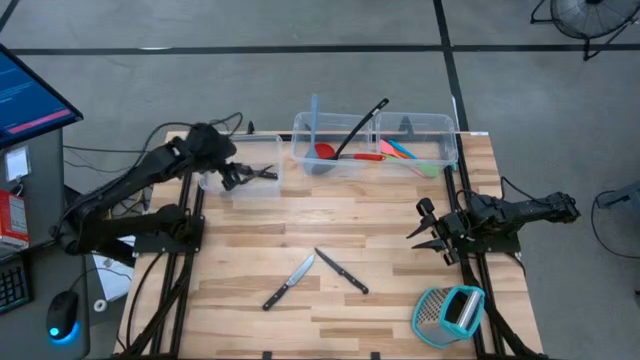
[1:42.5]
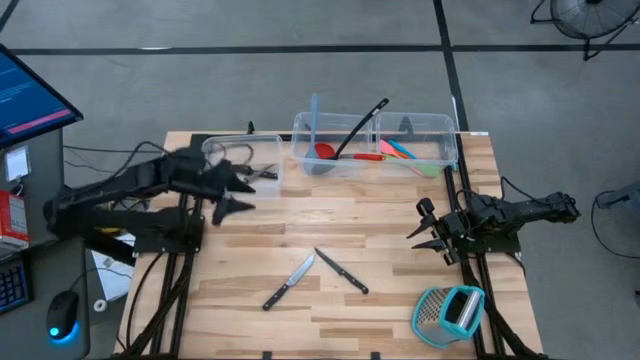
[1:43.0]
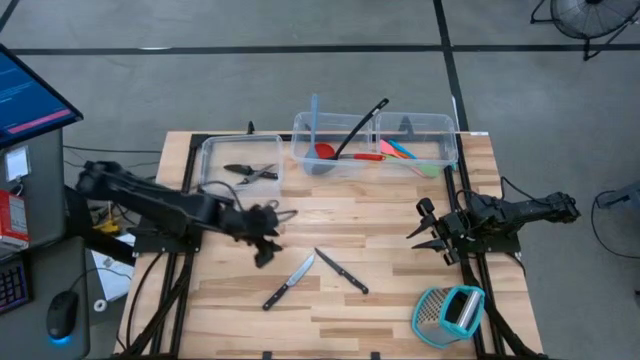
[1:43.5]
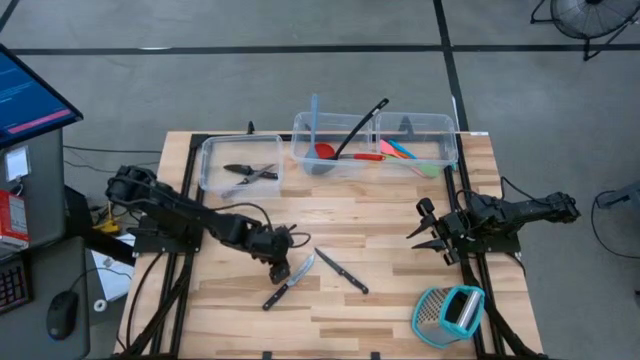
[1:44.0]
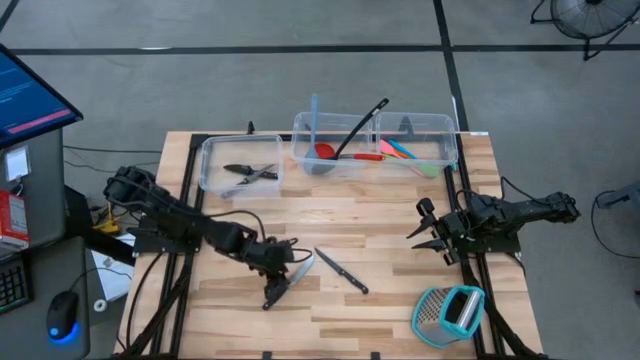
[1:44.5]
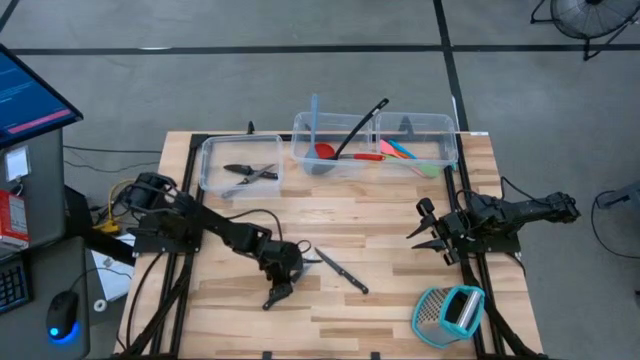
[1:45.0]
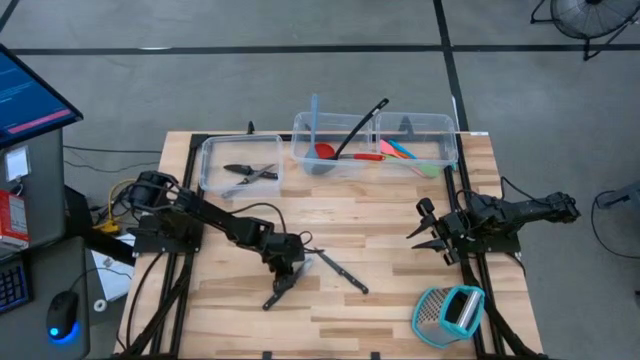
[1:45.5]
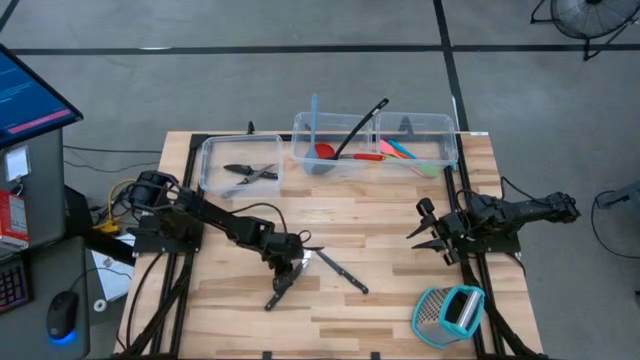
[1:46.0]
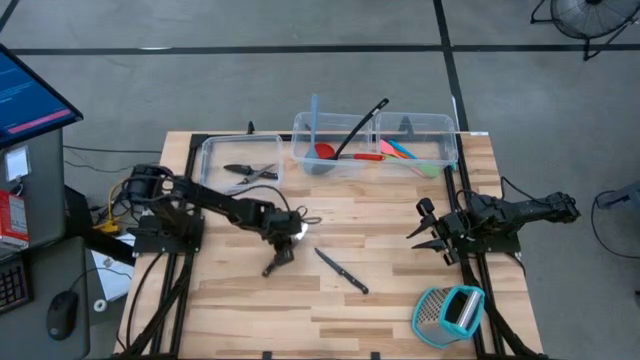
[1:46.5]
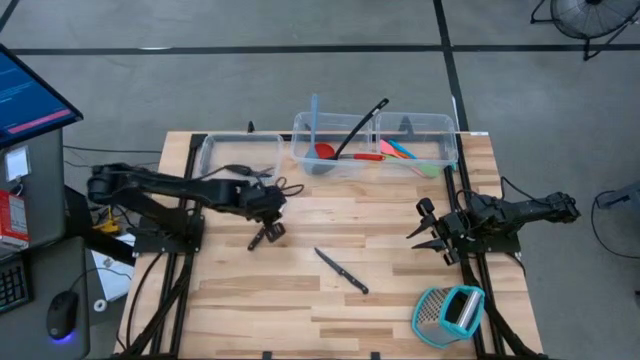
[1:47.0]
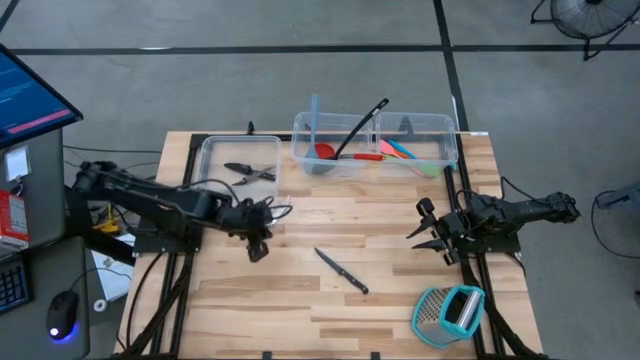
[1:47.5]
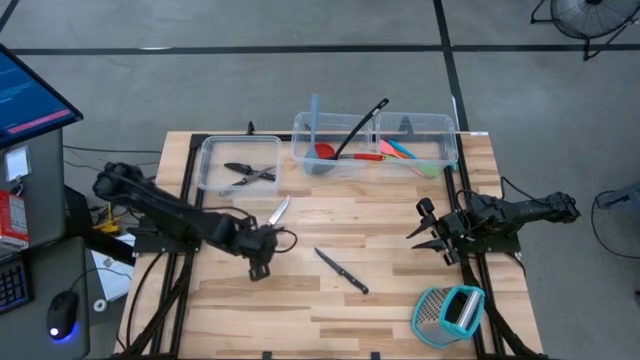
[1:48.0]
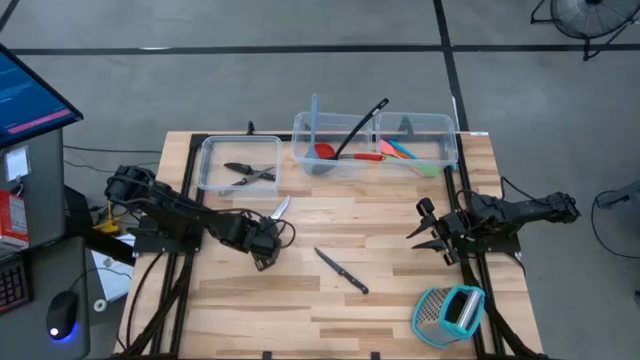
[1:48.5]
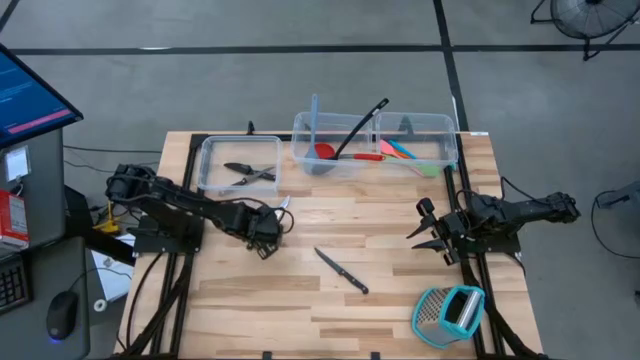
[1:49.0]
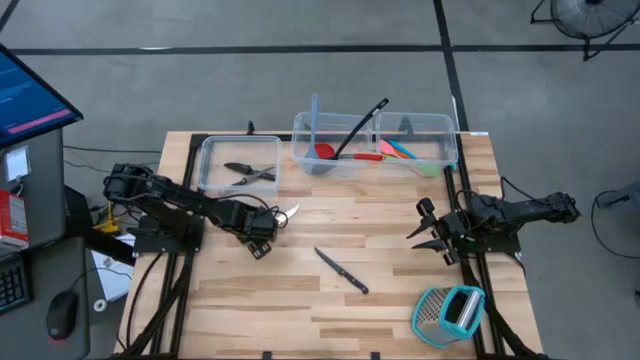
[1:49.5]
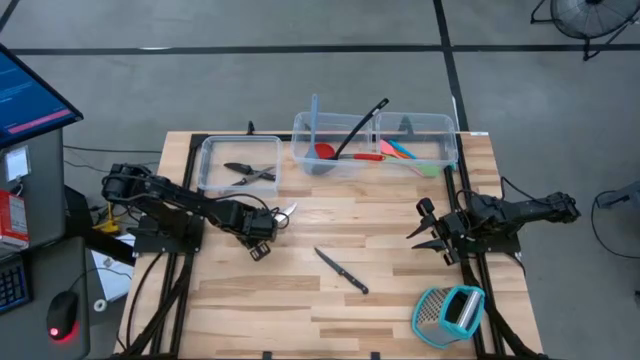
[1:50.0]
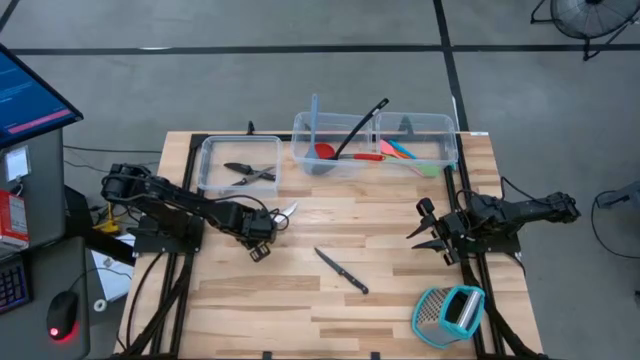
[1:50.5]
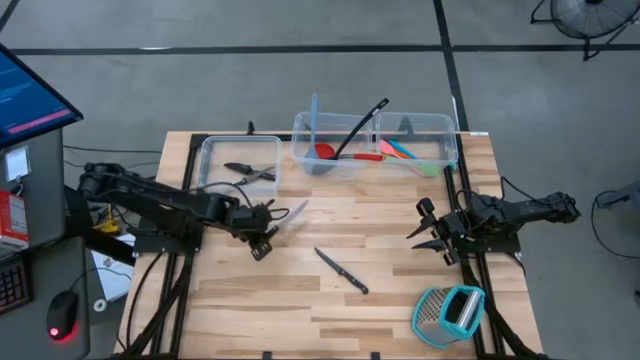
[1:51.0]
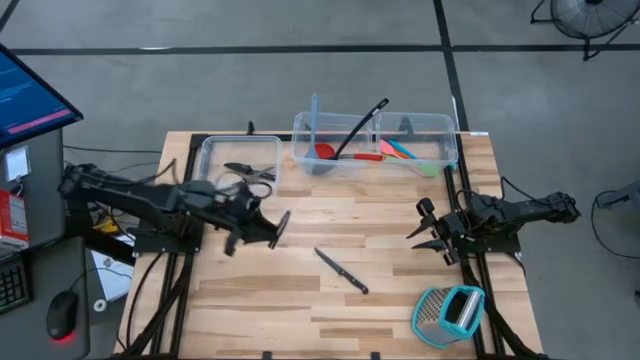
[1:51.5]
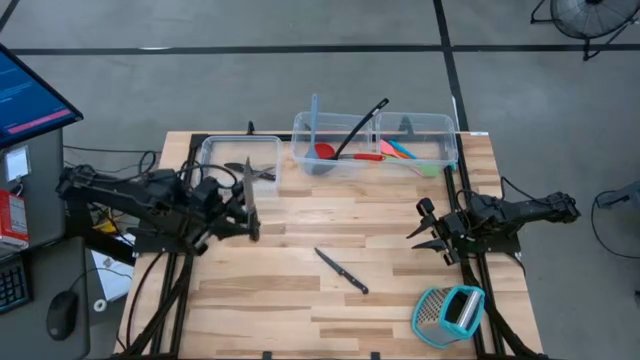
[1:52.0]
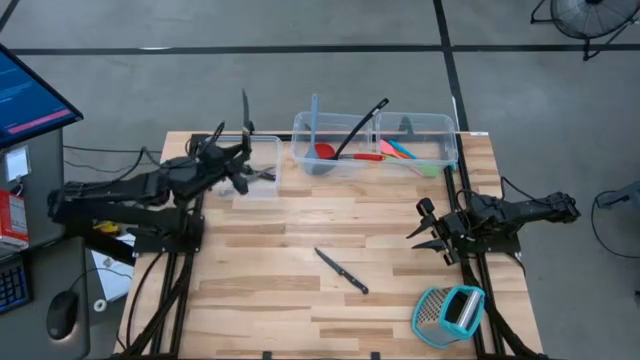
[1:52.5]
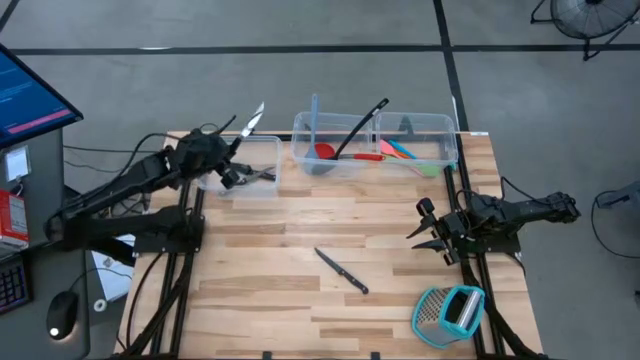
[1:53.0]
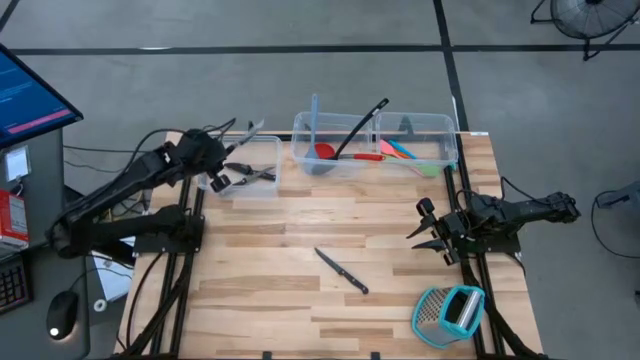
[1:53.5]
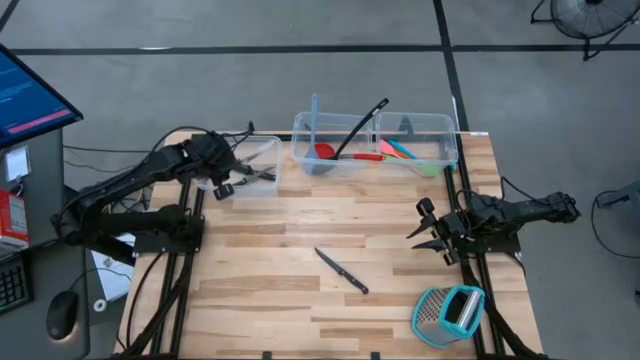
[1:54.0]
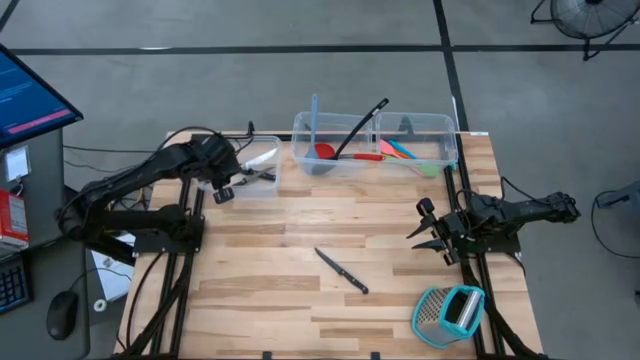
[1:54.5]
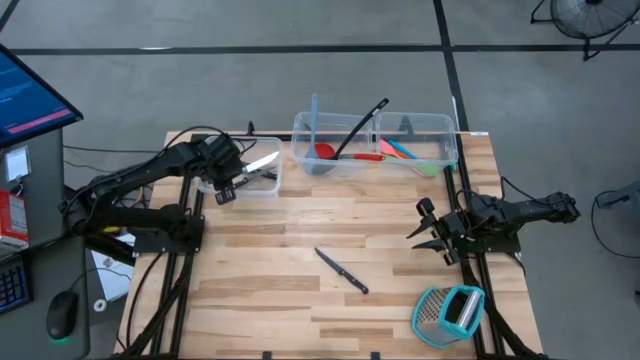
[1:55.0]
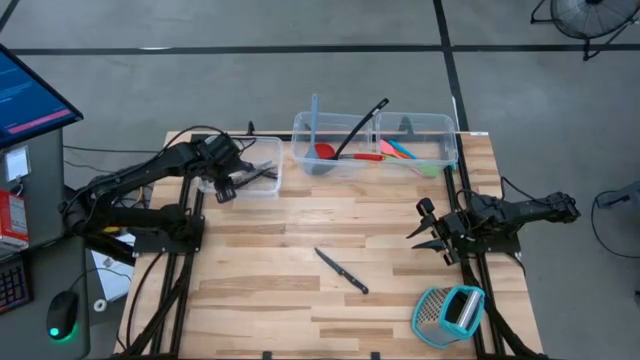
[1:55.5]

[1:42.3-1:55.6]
Task: Pick & Place Kitchen Items
Put the black knife into the top left transparent bin

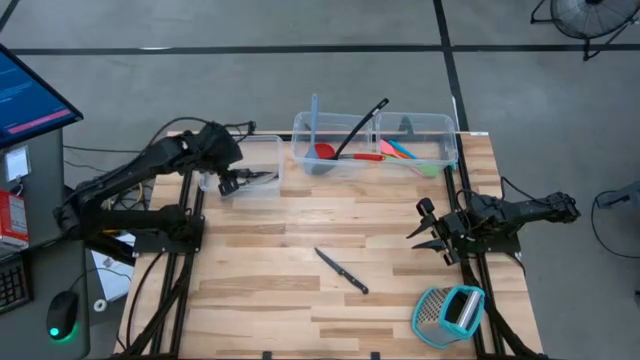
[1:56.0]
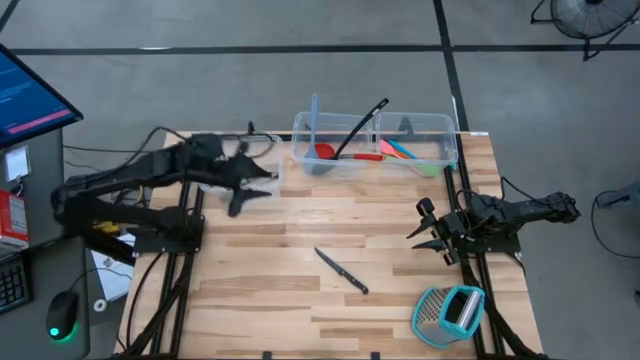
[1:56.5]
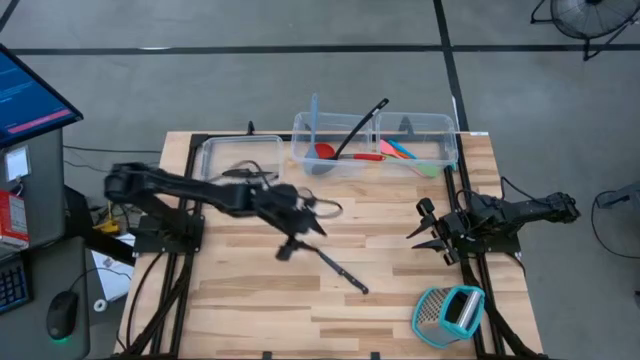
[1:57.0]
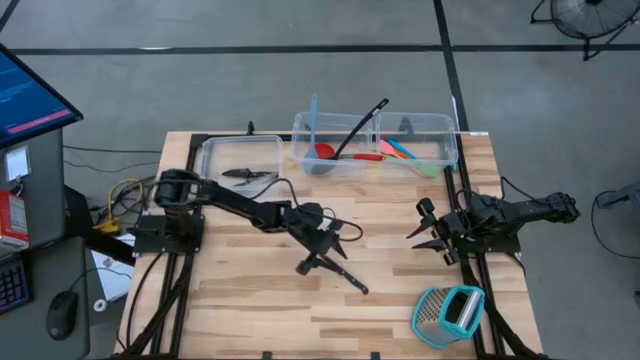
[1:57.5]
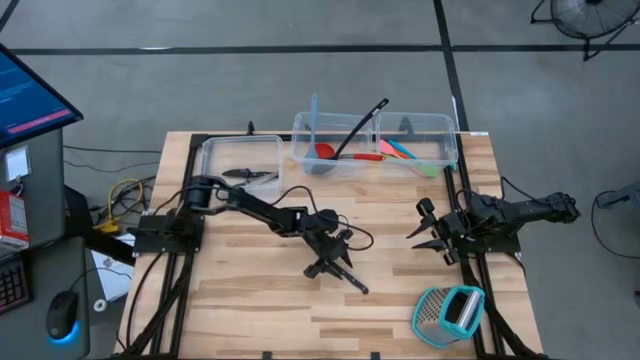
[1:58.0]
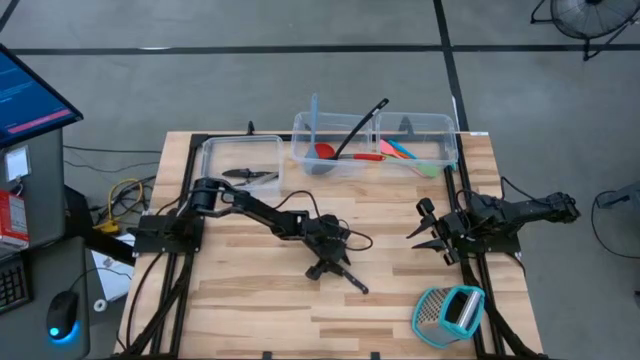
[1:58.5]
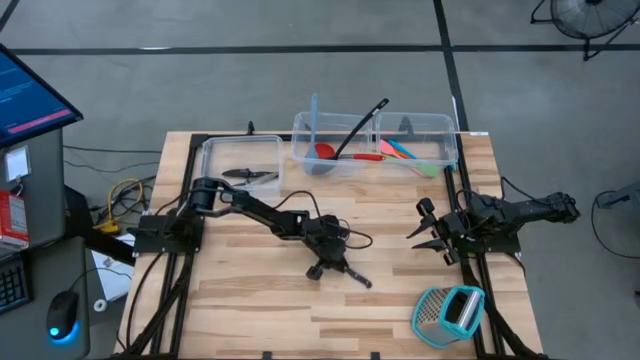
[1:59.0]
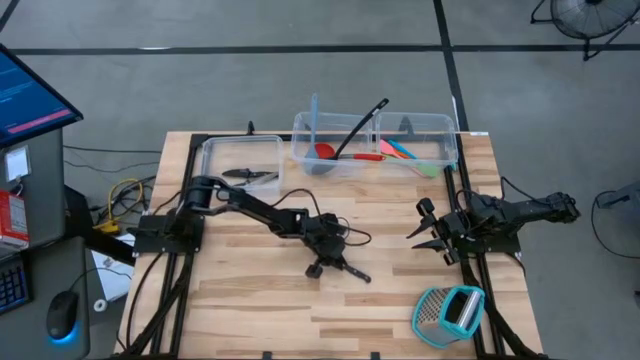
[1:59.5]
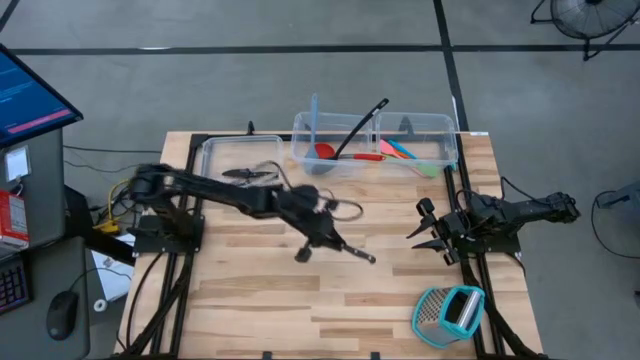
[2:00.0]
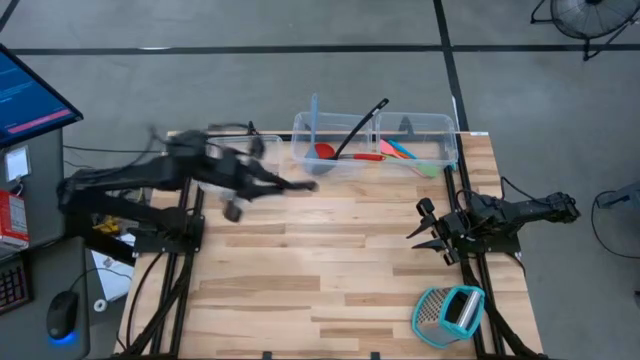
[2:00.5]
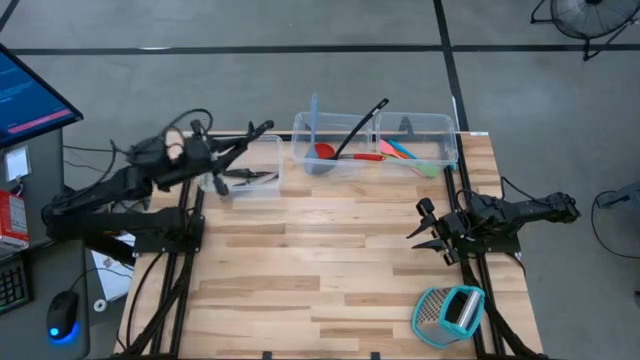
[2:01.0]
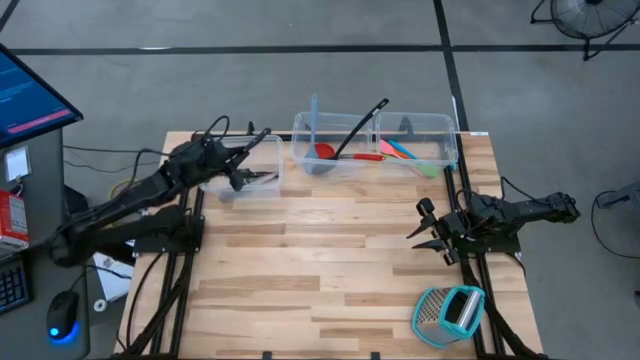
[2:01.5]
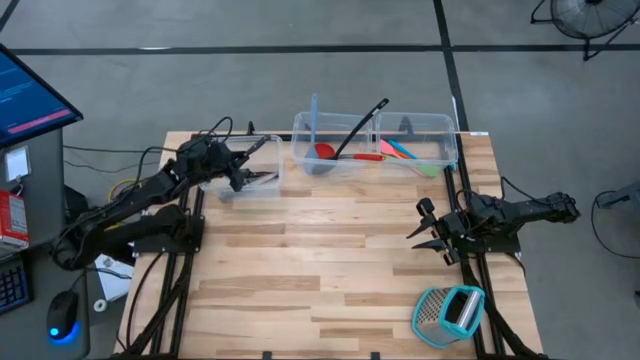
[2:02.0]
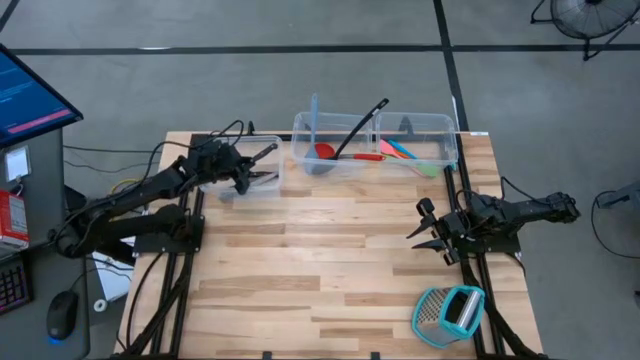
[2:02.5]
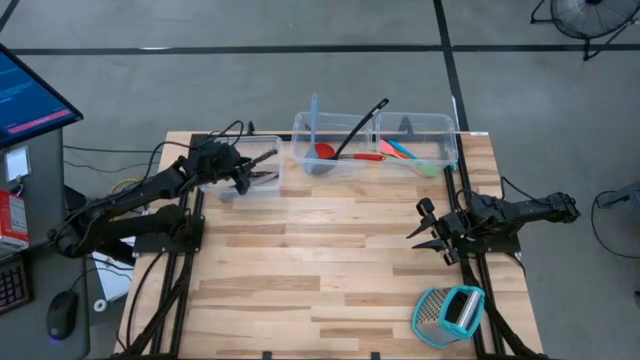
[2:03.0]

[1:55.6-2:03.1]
Put the black knife into the top left transparent bin
